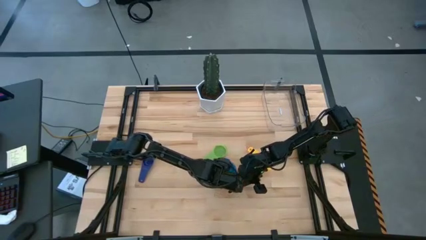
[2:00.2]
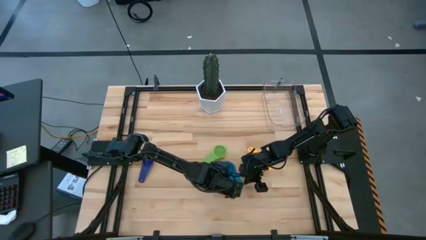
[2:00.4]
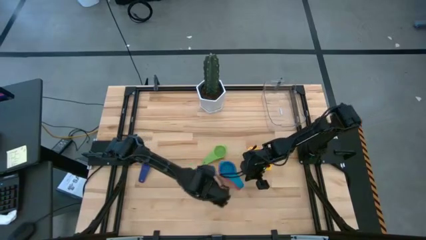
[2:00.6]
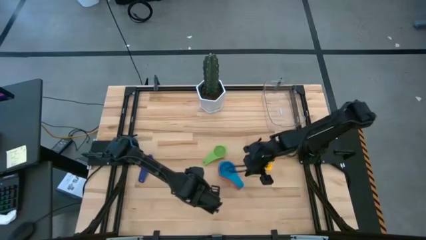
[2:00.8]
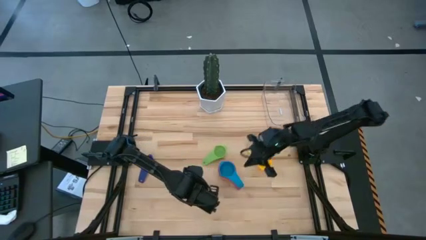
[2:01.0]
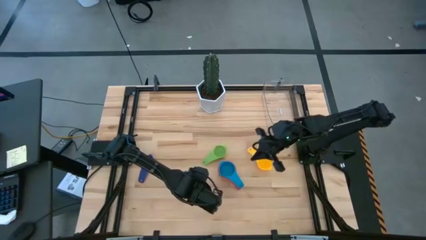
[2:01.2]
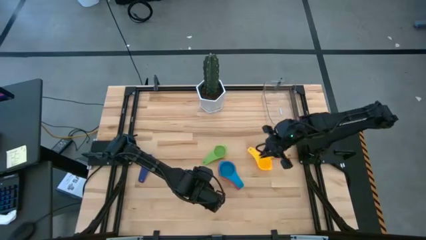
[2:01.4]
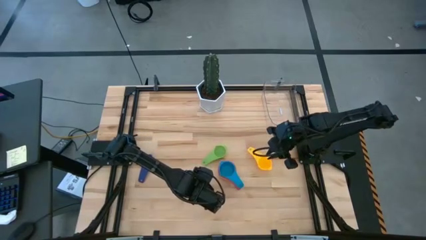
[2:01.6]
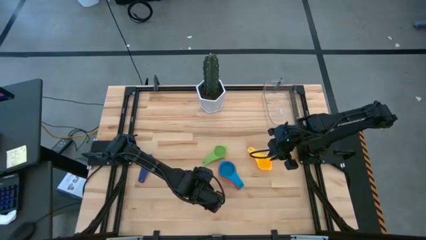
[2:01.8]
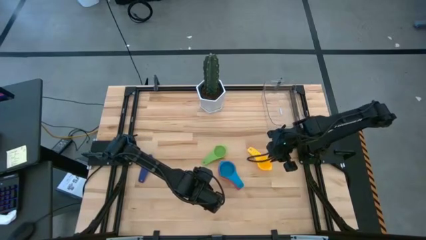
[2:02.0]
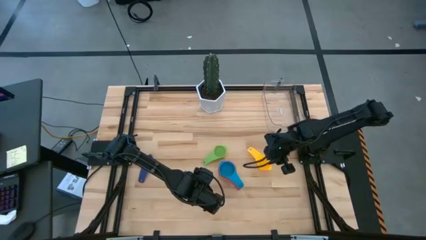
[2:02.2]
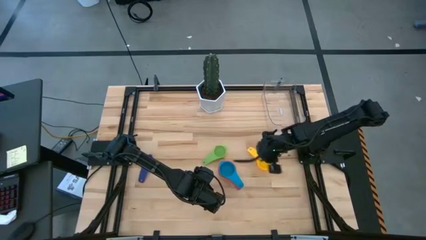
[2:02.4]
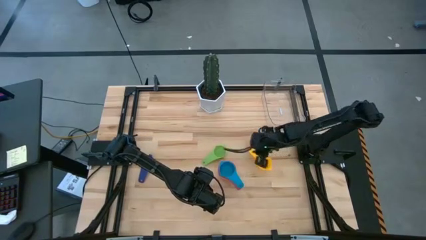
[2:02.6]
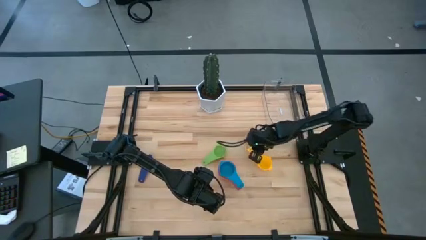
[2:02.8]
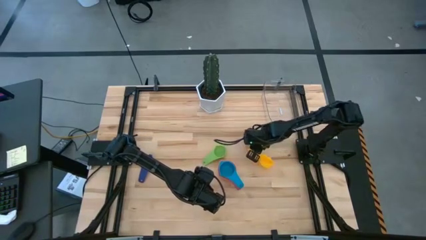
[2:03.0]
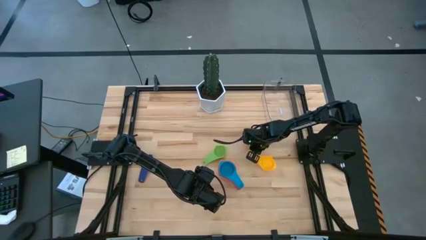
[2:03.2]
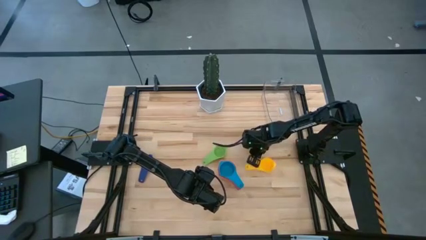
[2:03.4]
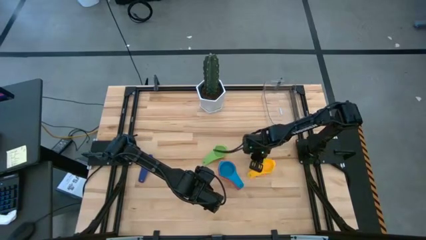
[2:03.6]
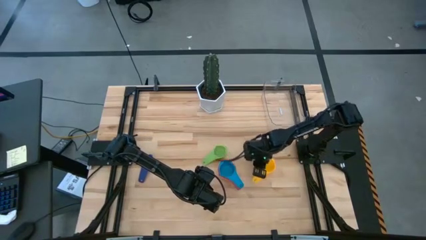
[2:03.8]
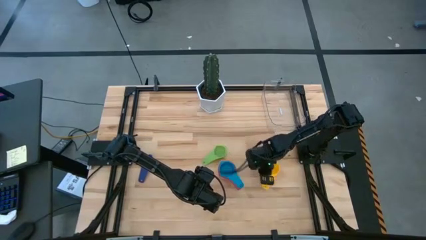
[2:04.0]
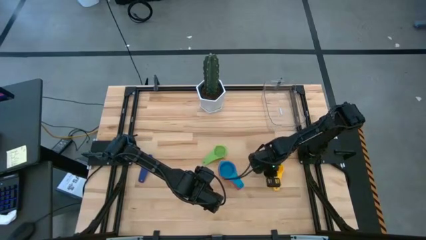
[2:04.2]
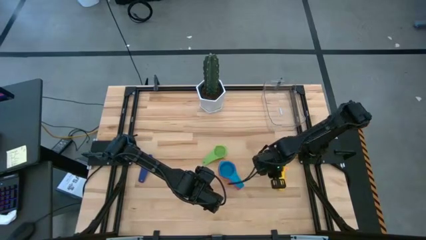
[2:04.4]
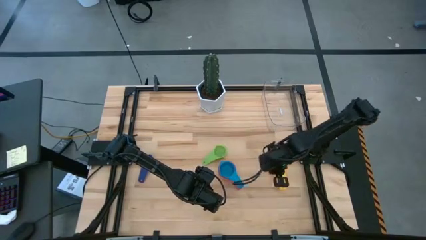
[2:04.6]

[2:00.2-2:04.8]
Task: Nest measuring cups in basket
Stack the yellow measuring cup on top of the light blue measuring cups

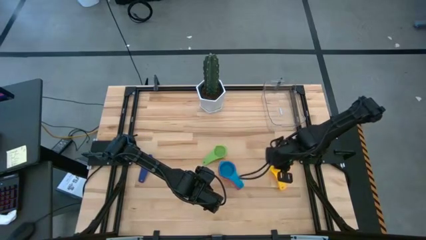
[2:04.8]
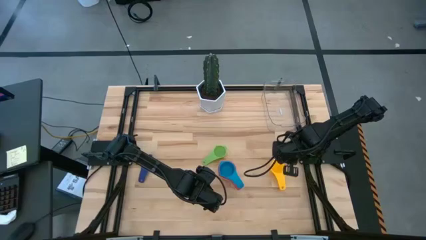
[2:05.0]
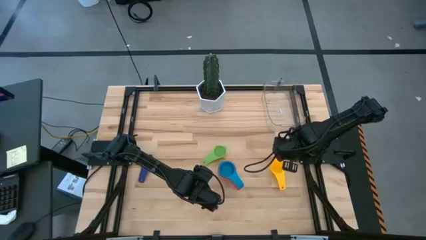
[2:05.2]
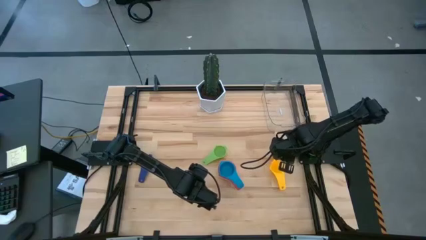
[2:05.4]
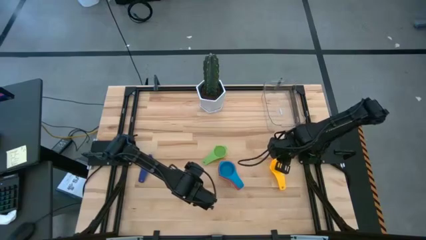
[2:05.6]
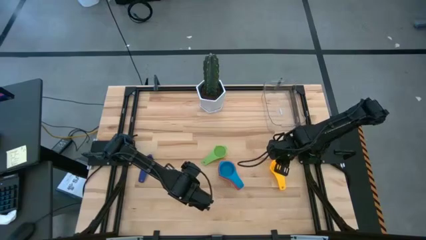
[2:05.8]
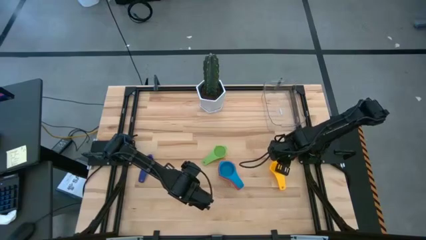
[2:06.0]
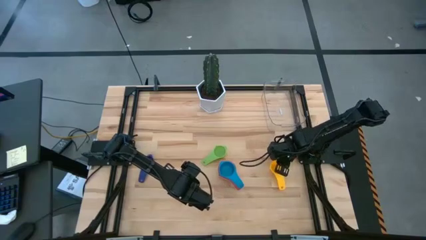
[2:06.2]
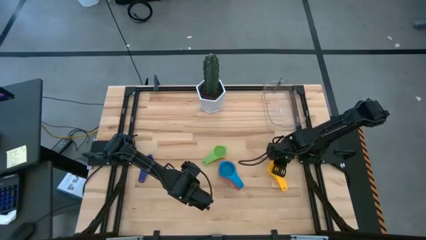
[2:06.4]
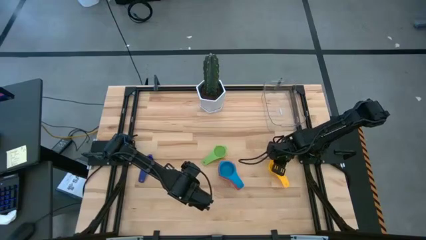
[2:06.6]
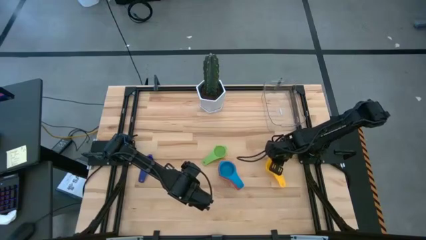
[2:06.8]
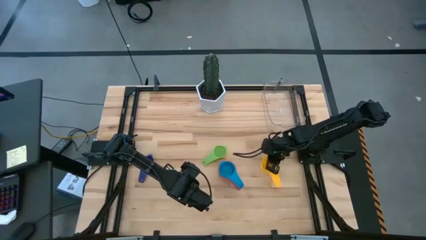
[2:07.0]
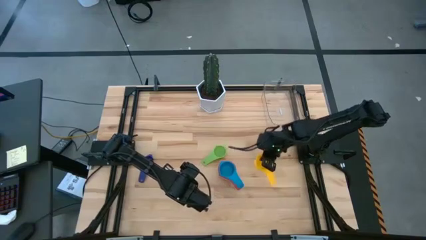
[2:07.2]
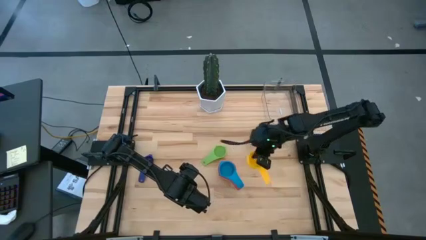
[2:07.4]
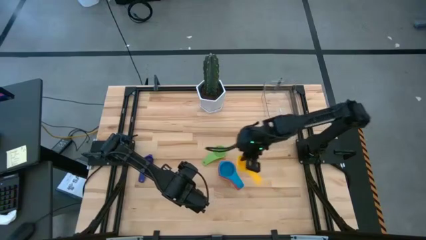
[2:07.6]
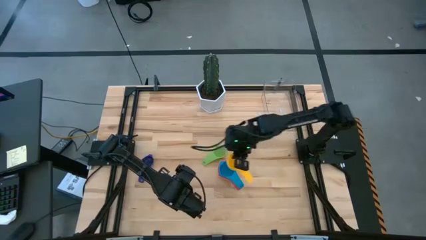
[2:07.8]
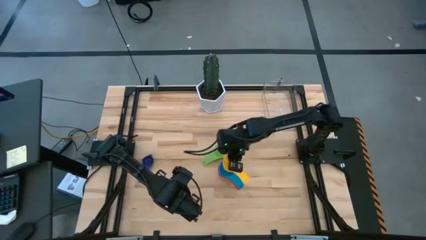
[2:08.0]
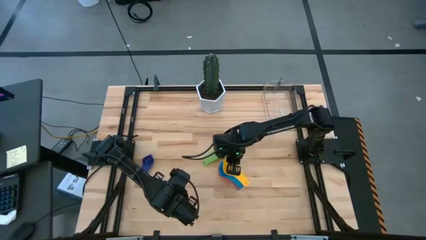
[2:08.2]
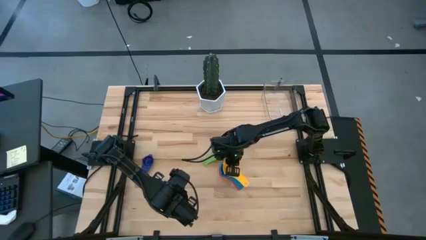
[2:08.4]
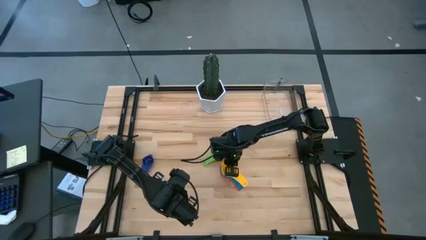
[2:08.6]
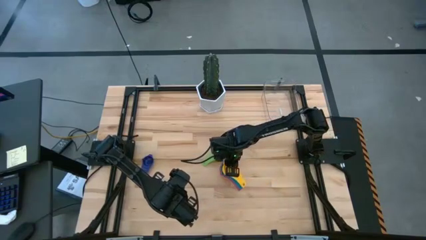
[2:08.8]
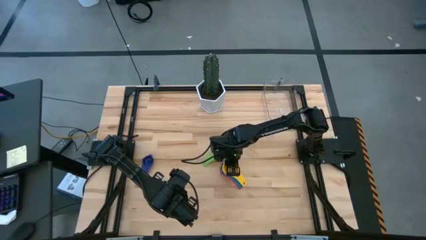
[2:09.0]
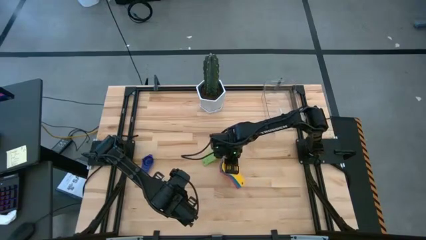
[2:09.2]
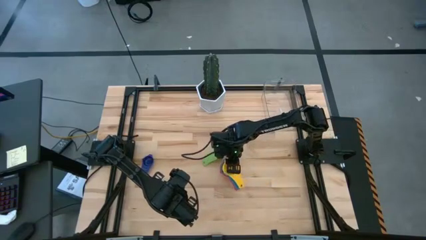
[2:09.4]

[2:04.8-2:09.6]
Stack the yellow measuring cup on top of the light blue measuring cups

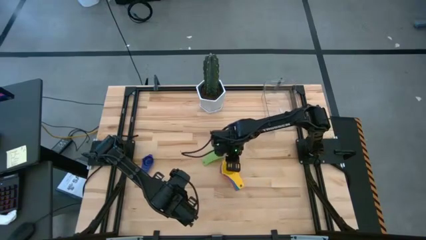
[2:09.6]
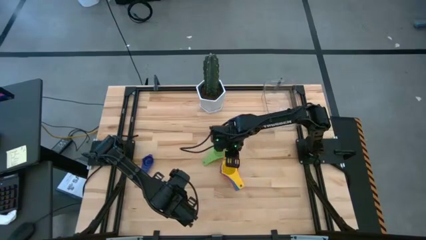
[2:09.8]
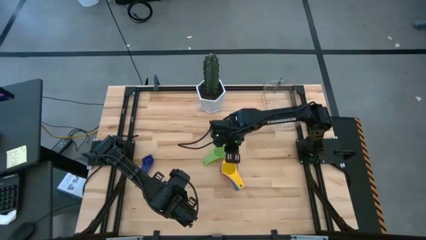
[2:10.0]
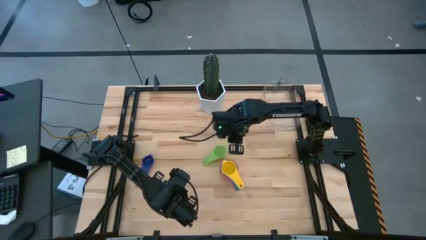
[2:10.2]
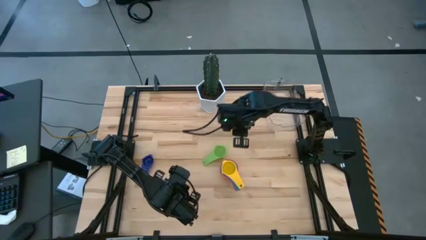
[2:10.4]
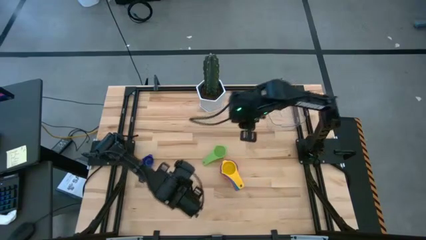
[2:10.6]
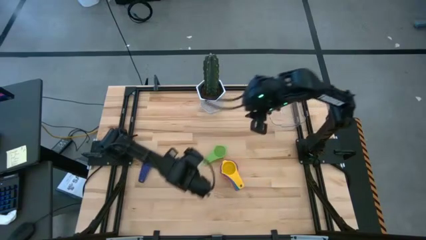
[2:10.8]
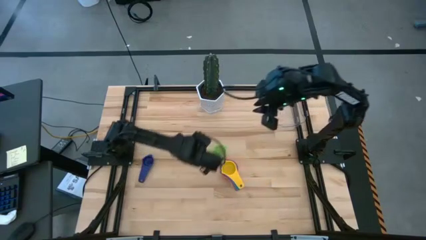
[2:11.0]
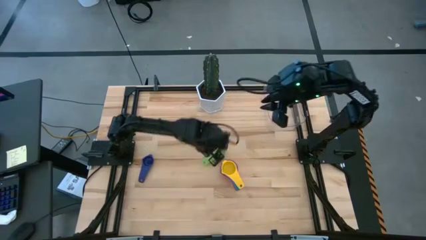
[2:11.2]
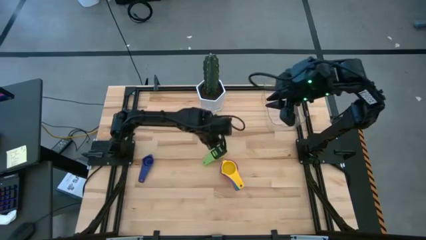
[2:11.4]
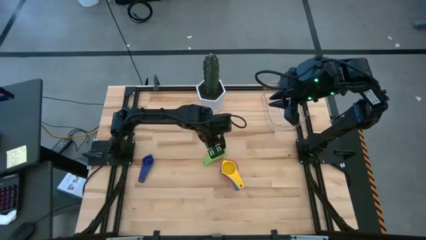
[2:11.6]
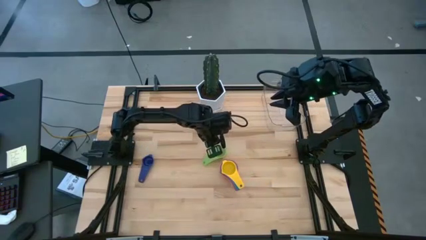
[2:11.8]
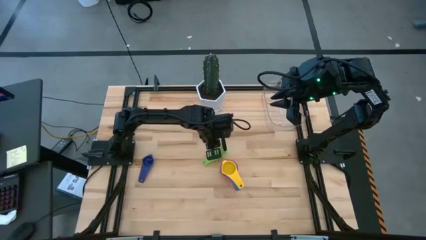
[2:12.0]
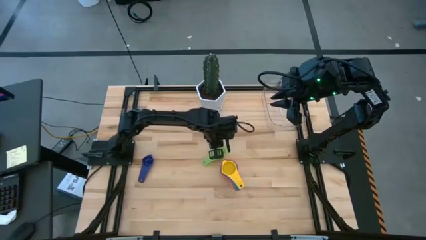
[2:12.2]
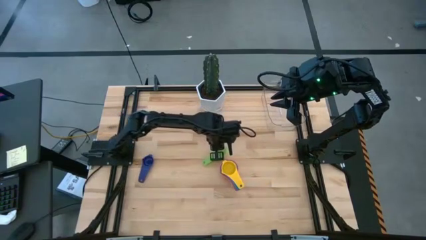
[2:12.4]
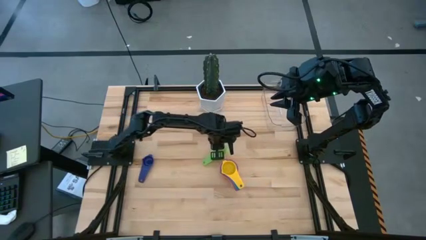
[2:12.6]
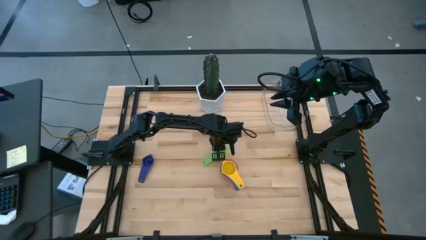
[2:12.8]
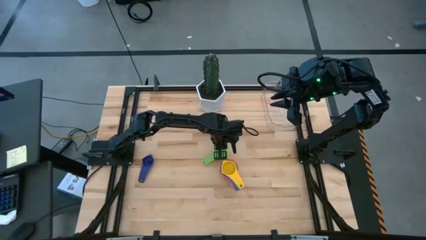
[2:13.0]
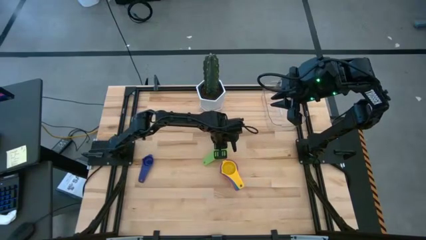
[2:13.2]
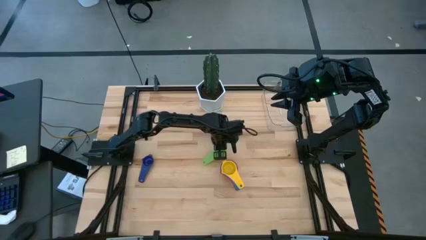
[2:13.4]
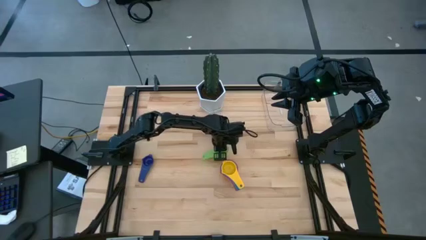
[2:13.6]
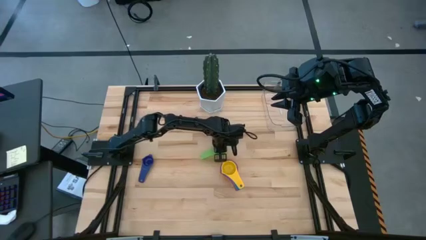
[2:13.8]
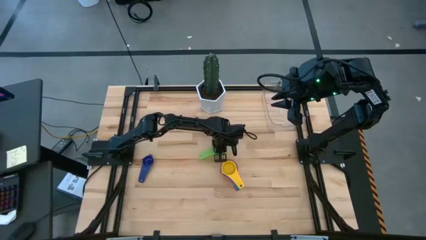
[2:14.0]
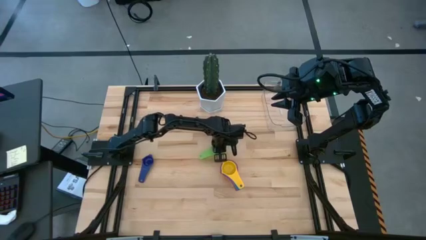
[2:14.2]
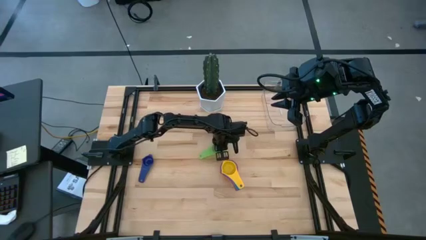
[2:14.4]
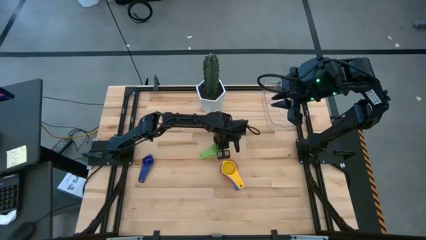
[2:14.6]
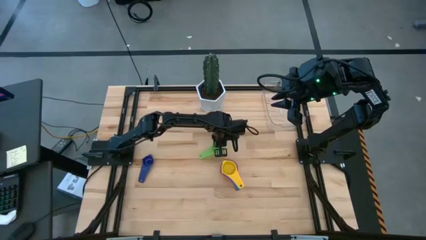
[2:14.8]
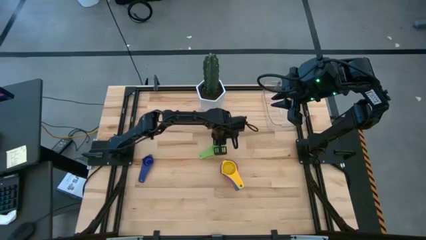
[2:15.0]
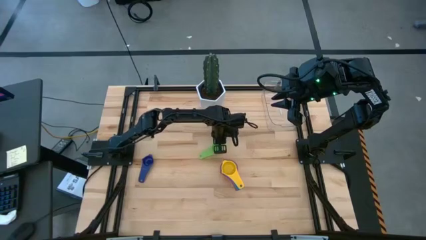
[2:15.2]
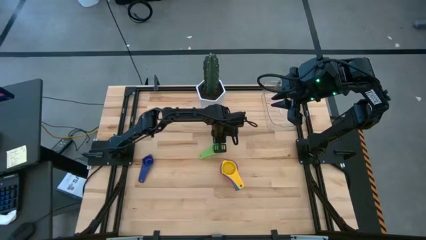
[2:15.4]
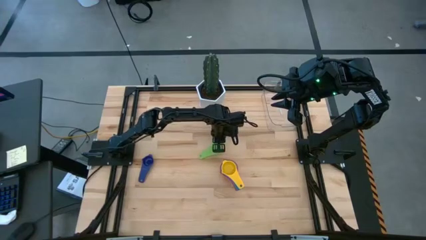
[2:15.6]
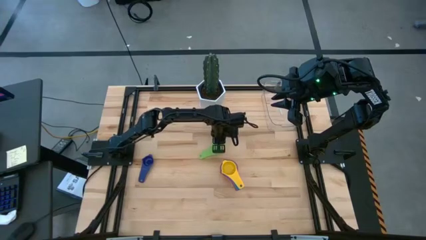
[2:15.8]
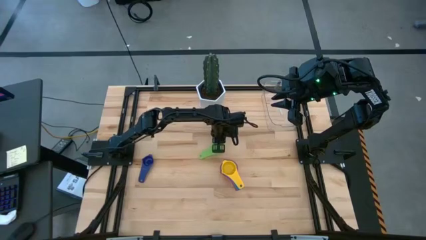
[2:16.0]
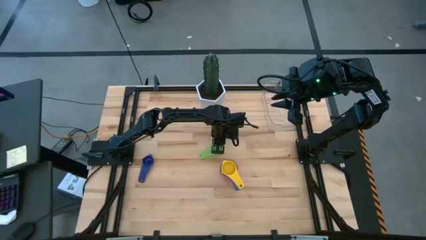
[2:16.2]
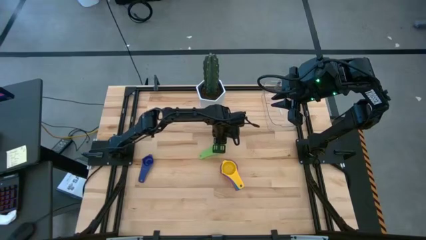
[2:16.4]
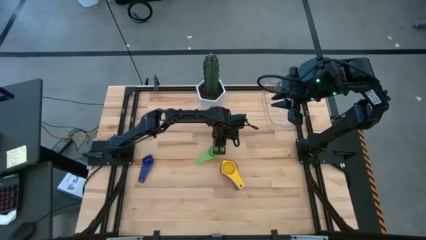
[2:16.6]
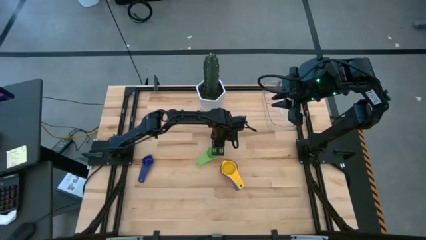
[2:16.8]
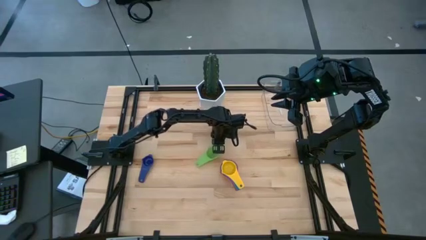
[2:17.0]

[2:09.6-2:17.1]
Stack the green measuring cup on top of the yellow measuring cups
